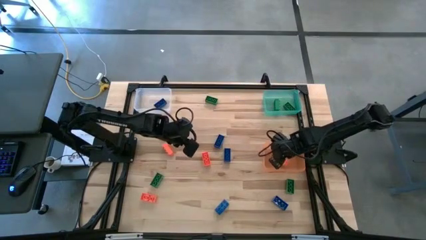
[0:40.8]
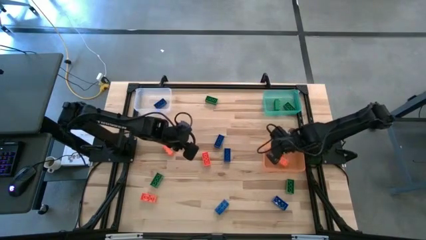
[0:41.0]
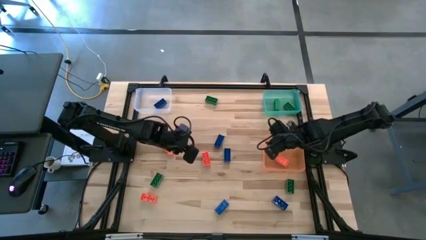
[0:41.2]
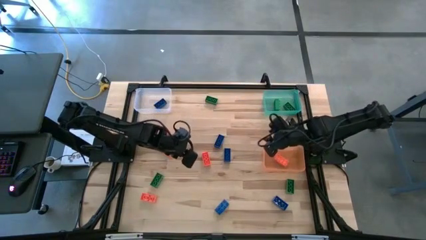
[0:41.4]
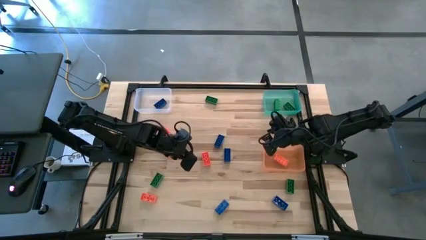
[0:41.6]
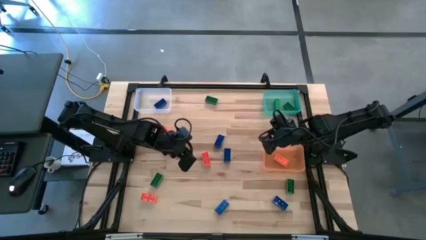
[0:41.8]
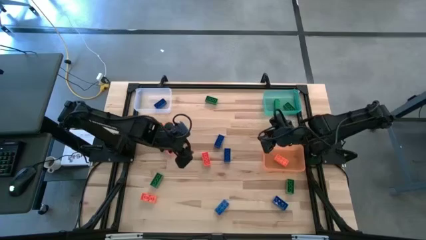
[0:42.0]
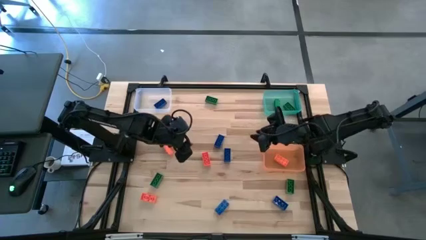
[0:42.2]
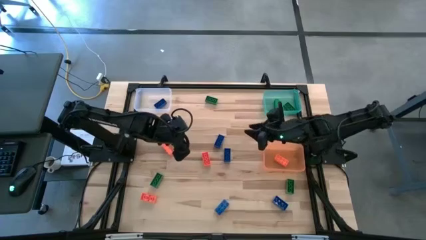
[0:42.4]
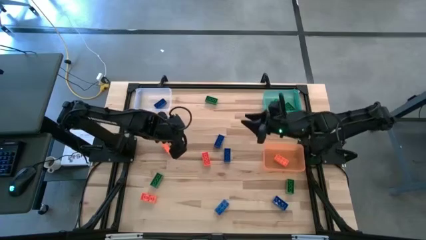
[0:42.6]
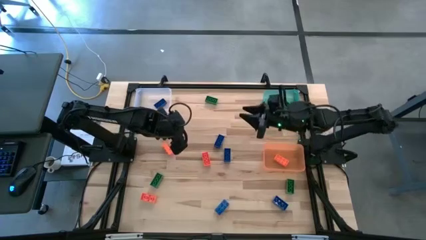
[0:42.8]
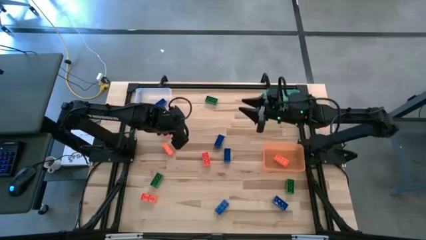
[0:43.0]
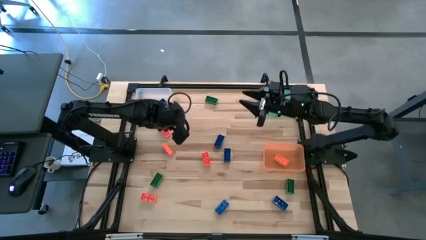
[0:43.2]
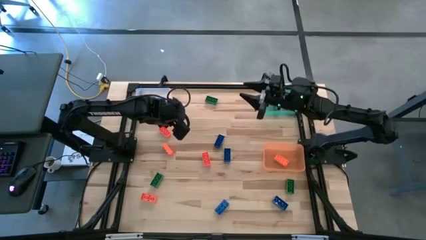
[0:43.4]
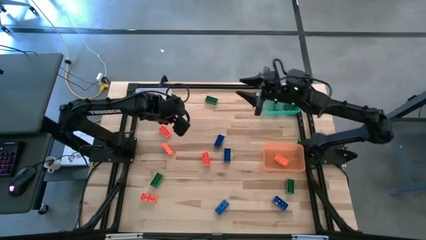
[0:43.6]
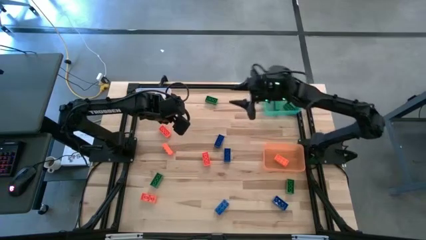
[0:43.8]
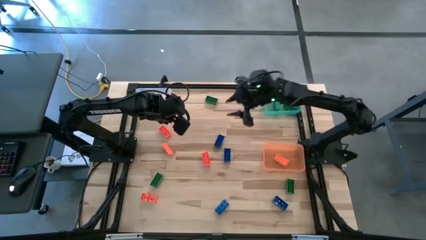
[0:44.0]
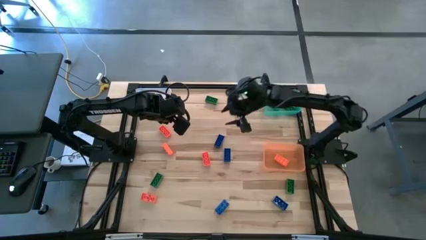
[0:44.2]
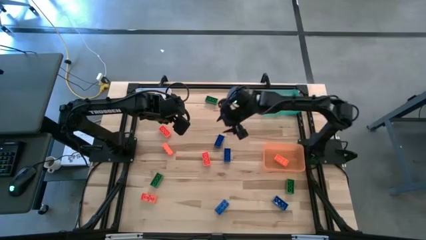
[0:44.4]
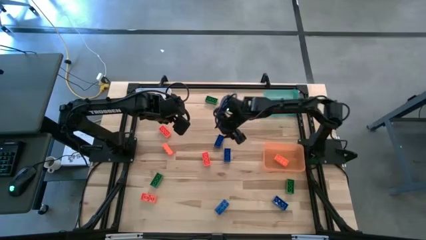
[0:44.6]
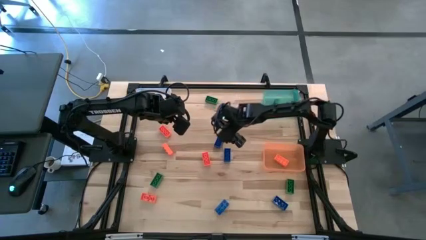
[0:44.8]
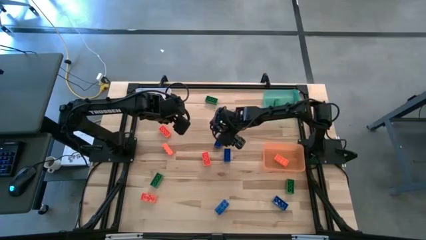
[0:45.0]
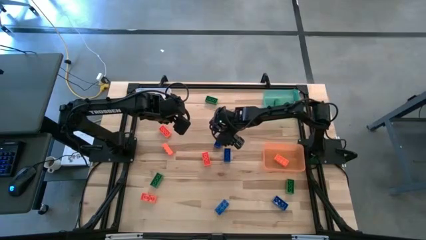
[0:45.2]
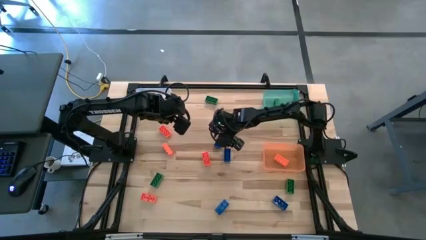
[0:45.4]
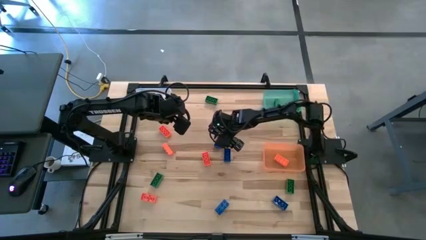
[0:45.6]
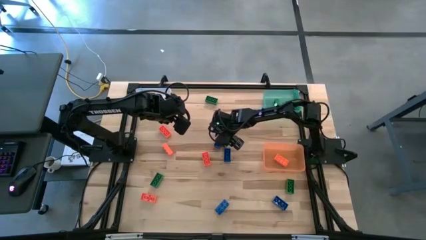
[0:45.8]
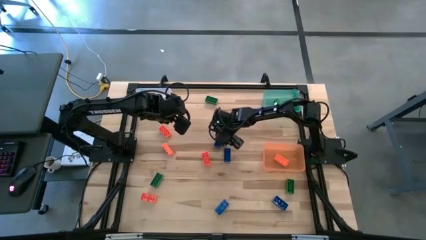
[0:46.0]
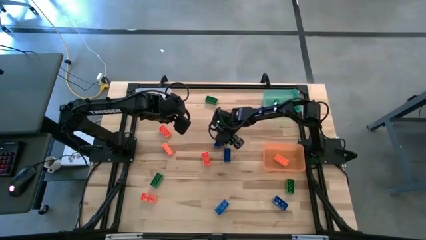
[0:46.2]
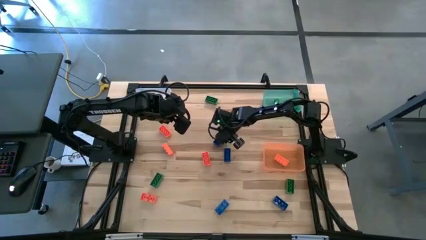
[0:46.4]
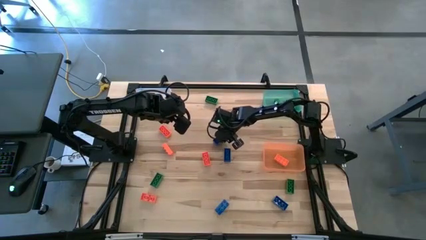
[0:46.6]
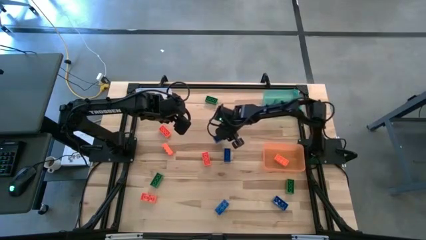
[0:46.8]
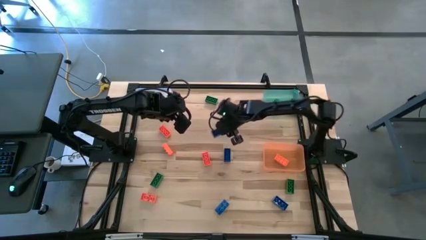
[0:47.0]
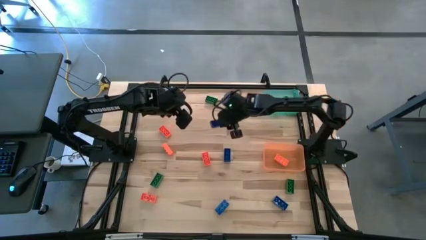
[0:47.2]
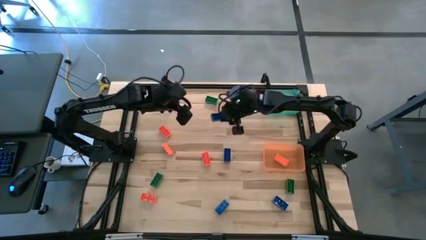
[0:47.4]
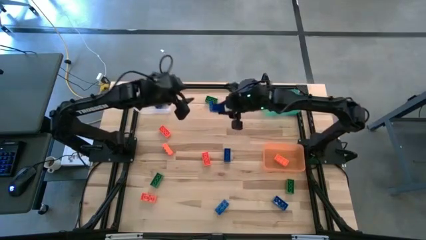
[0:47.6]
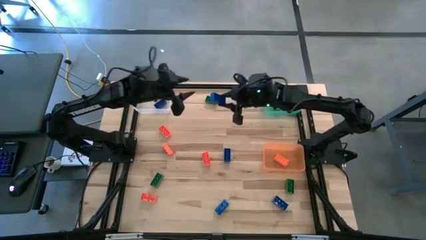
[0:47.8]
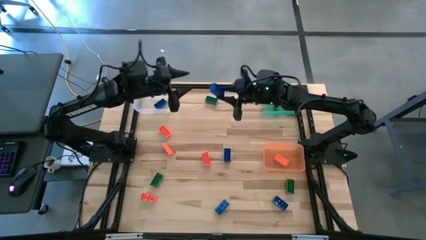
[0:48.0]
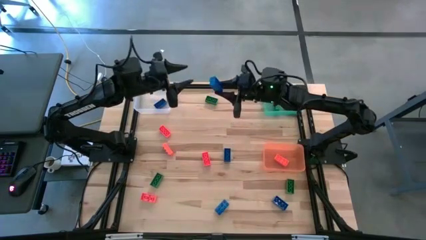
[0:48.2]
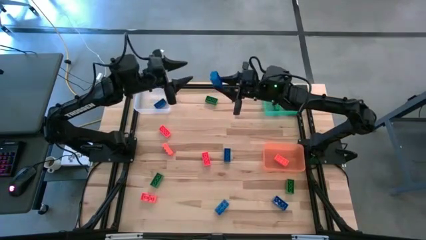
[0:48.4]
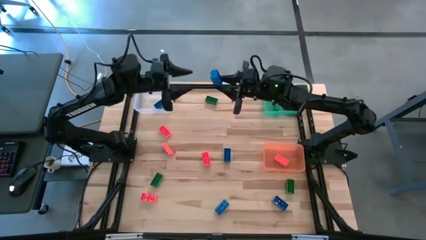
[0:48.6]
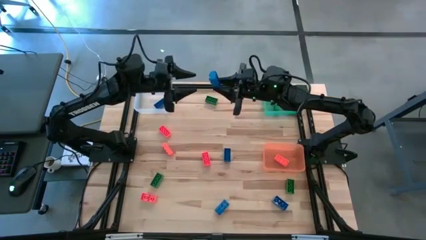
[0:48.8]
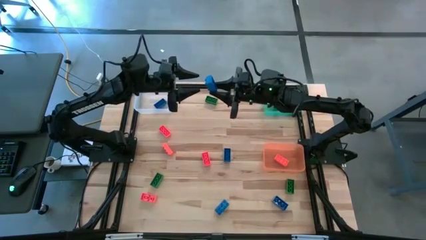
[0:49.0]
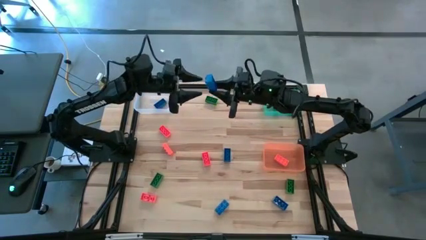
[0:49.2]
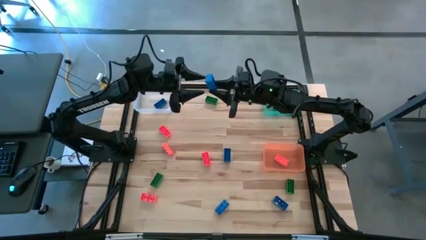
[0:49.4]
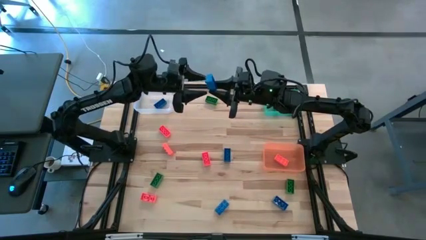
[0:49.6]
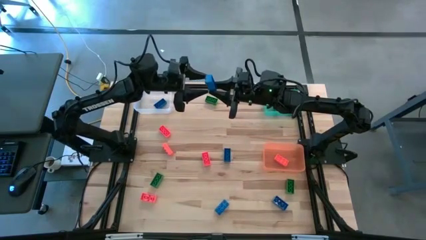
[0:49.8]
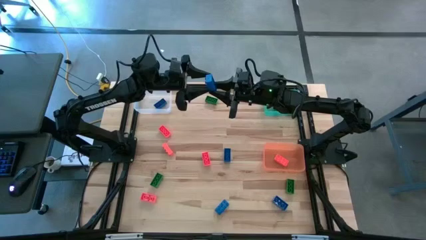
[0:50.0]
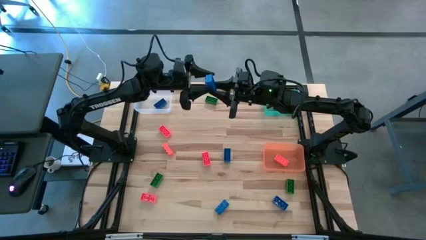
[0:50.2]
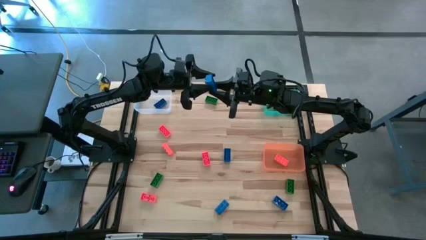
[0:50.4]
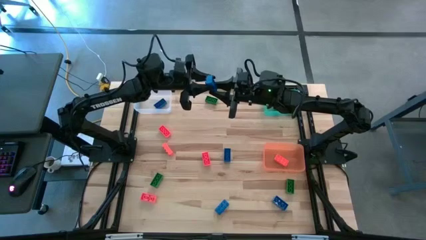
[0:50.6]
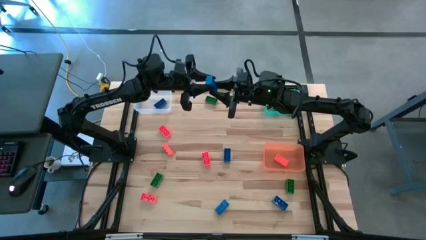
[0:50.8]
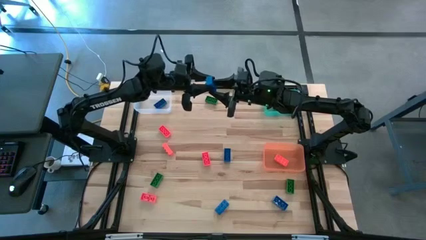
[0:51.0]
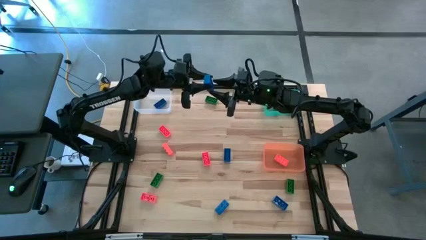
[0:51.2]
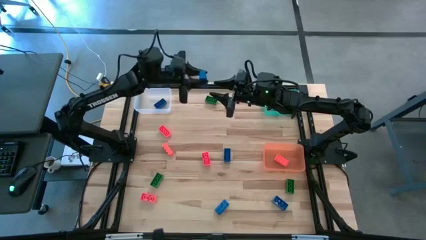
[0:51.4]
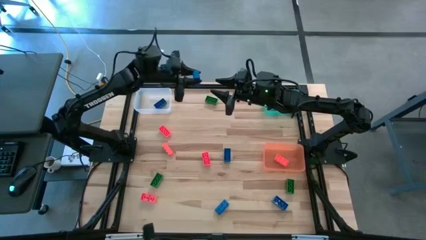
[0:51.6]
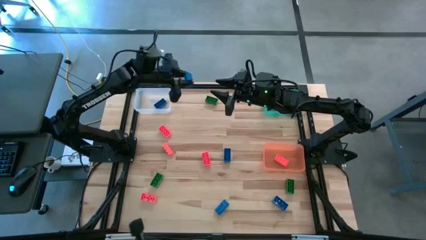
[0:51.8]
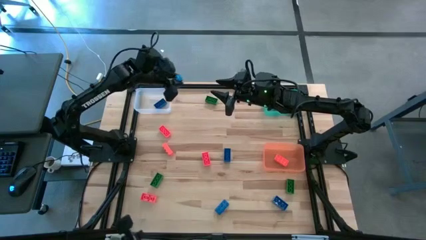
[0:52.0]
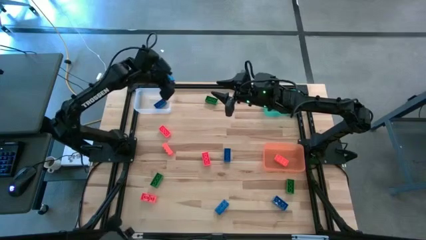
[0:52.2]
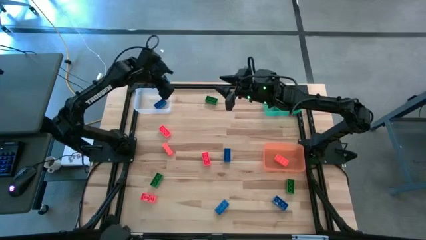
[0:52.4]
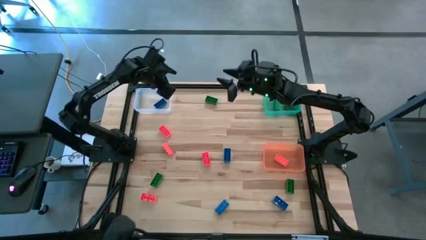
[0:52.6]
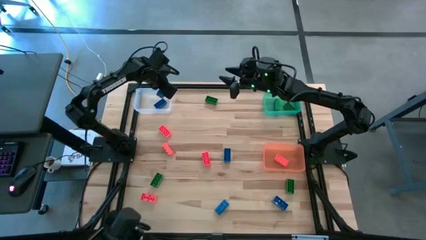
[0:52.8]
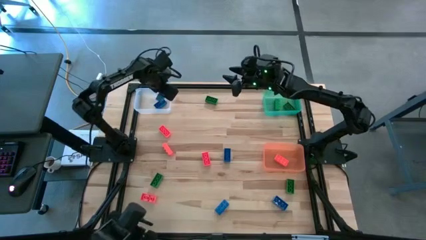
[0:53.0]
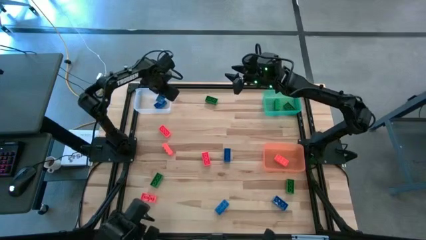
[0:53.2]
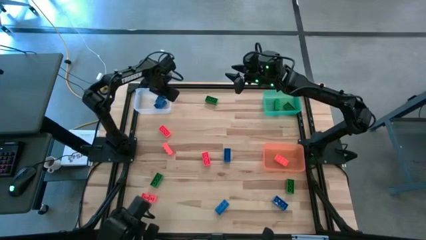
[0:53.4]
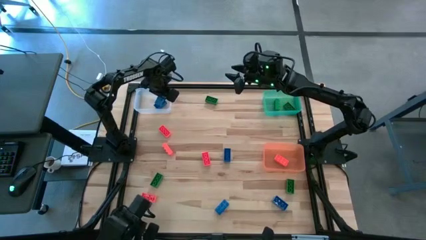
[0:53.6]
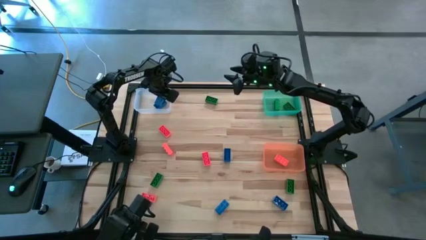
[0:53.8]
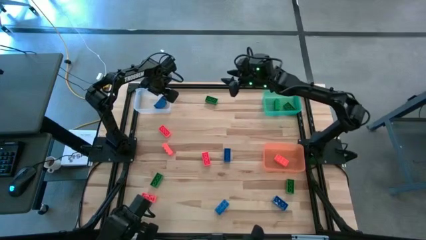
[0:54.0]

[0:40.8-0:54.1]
Task: Sort & place blocks by color
Put the blue game piece into the transparent bin

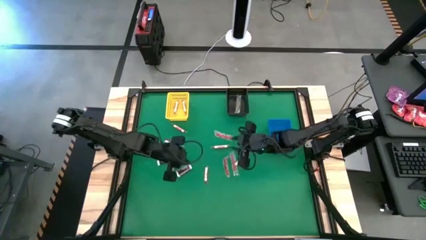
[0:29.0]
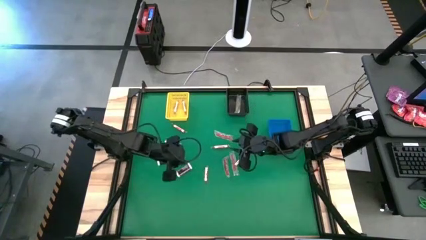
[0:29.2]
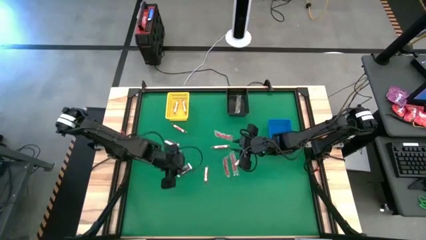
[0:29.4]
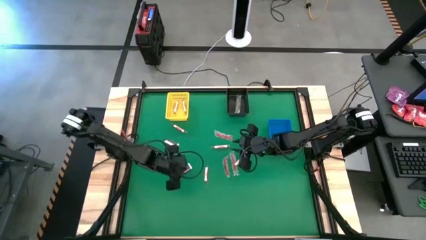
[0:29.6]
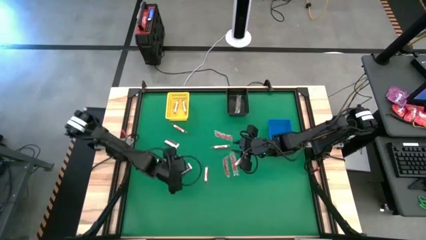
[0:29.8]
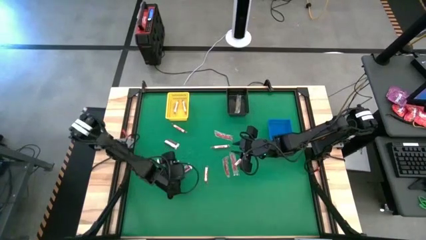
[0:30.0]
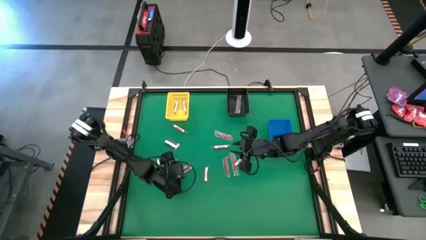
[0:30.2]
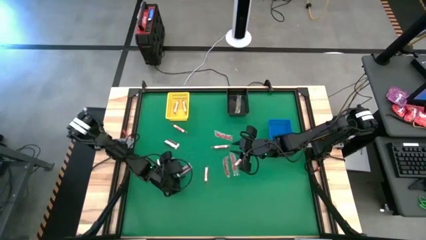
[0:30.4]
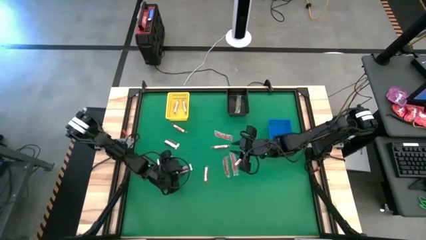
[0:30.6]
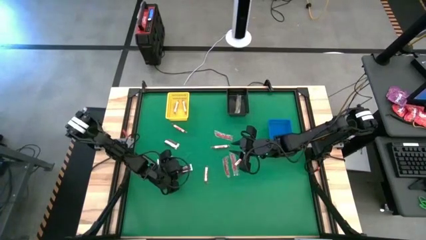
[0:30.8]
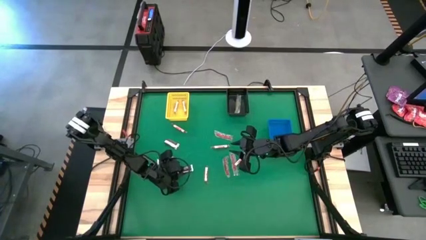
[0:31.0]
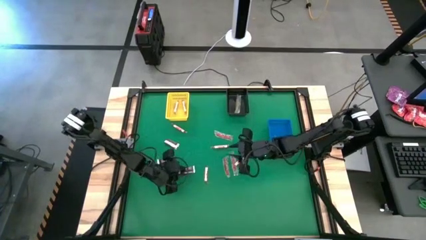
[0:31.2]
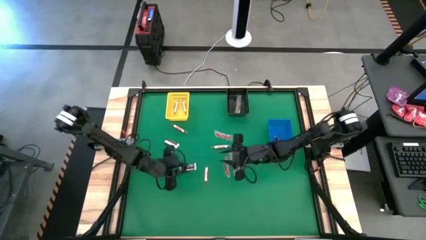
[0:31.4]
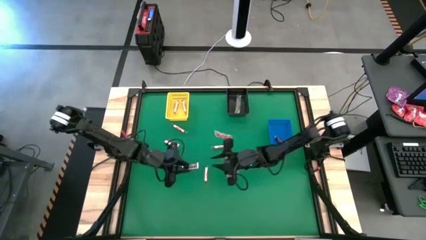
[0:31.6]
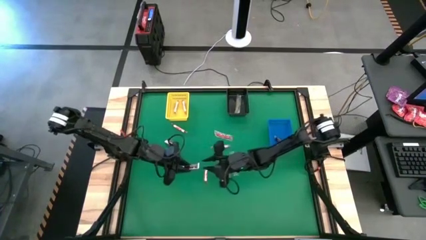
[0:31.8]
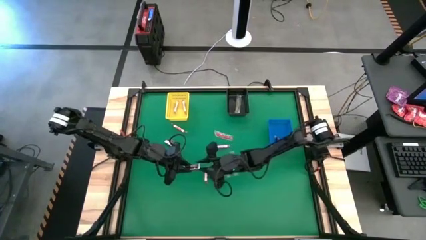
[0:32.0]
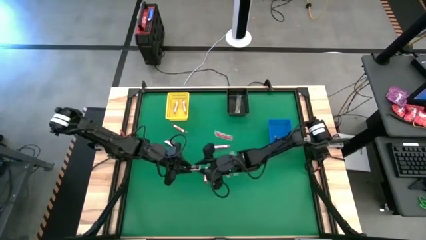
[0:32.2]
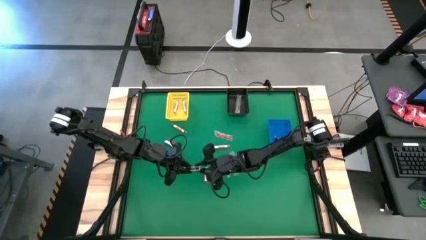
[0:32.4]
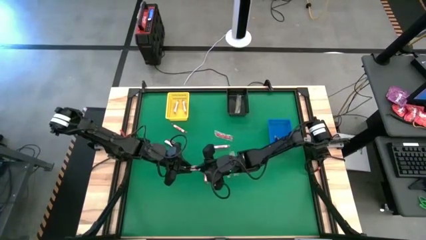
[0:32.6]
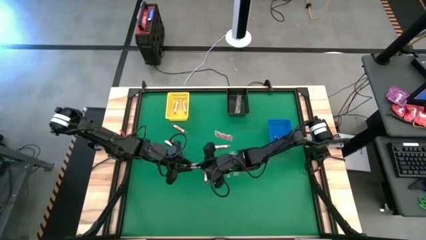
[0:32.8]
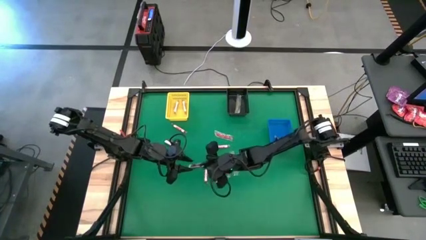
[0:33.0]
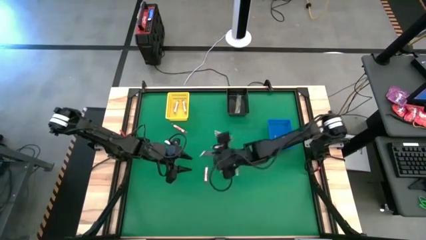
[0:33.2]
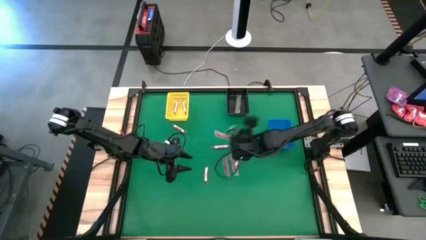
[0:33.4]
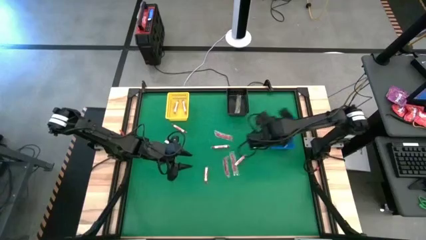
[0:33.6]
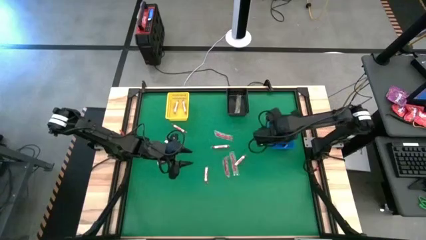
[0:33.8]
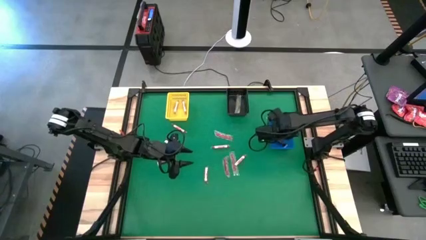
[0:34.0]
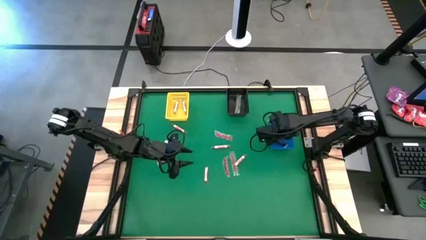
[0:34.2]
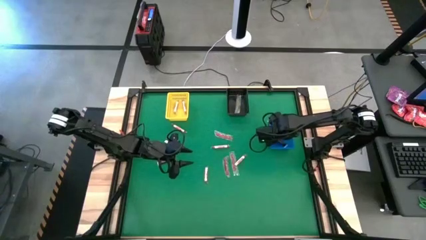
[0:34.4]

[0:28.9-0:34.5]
Task: Sort candy by brand, put in halloween buckets
Put the brown chocolate into the blue basket
